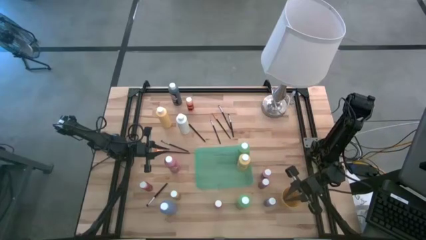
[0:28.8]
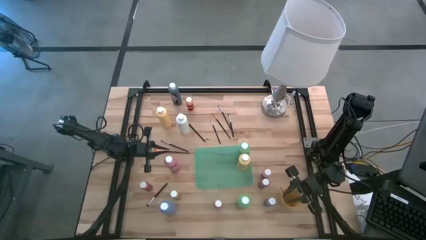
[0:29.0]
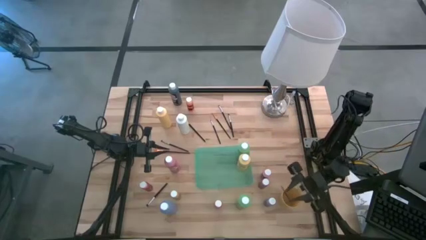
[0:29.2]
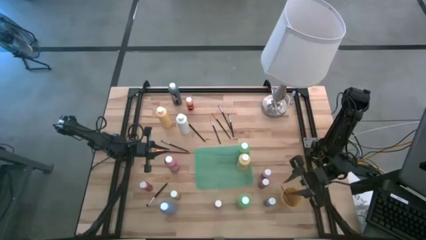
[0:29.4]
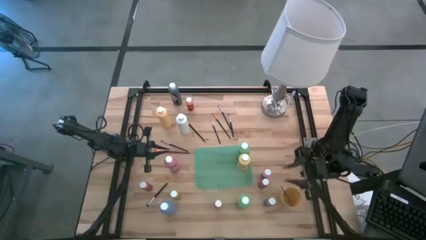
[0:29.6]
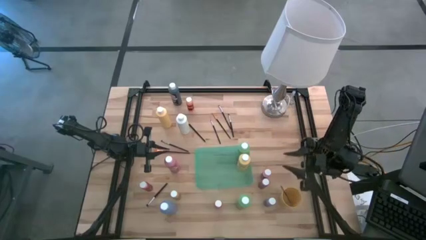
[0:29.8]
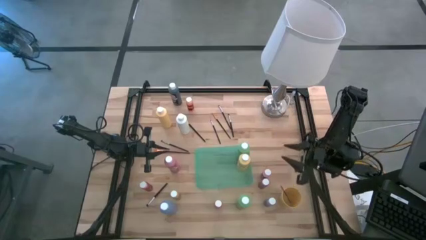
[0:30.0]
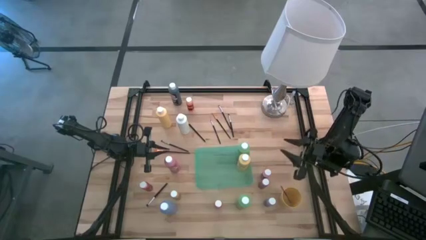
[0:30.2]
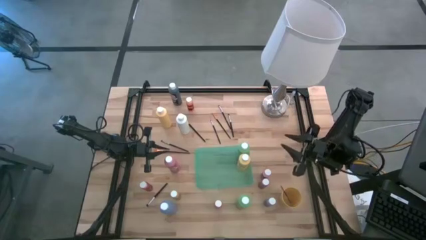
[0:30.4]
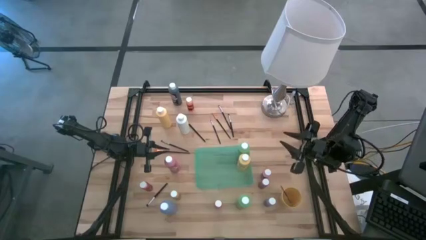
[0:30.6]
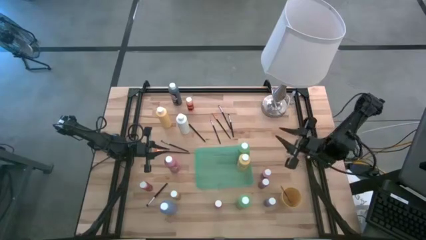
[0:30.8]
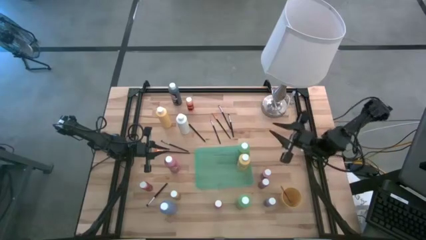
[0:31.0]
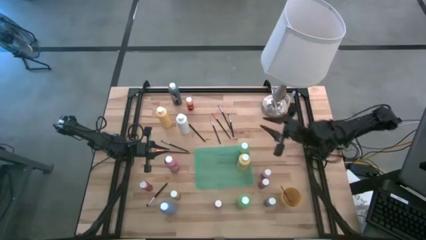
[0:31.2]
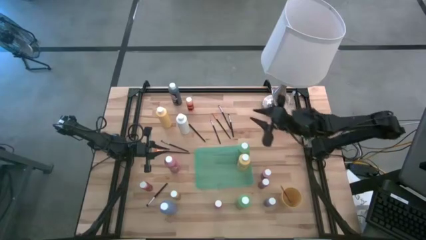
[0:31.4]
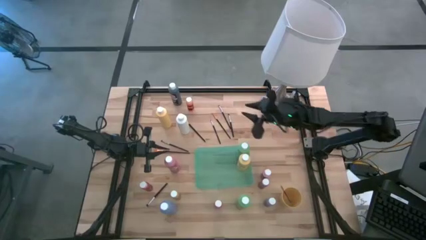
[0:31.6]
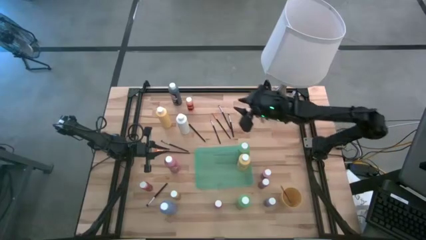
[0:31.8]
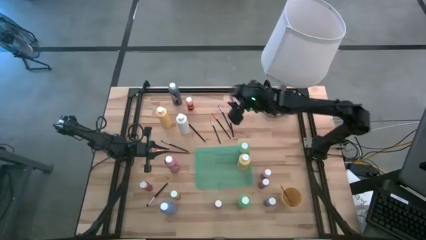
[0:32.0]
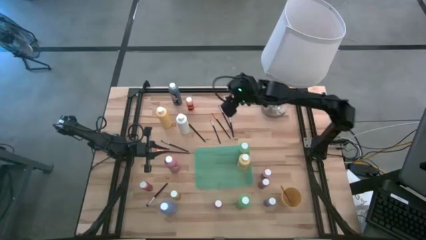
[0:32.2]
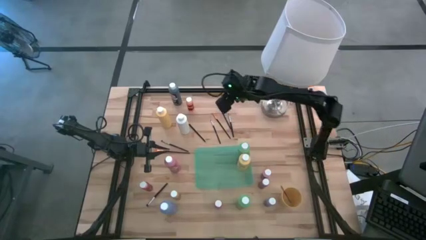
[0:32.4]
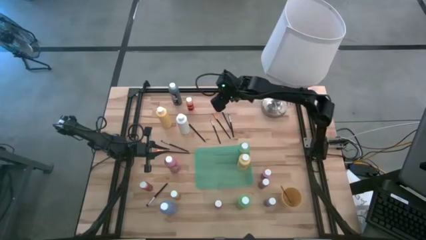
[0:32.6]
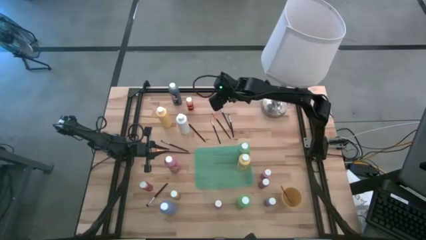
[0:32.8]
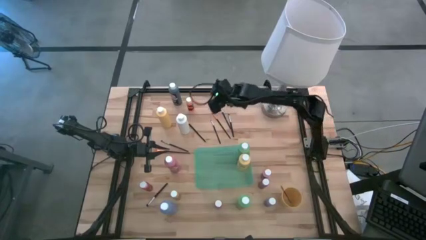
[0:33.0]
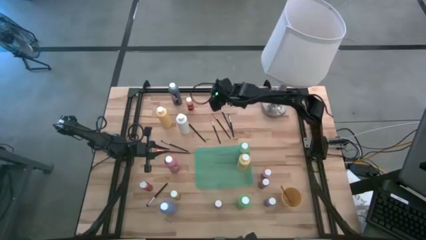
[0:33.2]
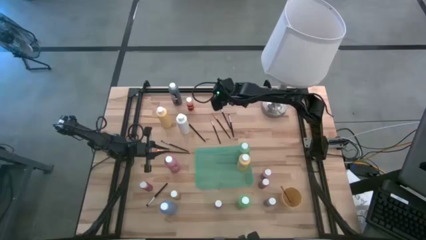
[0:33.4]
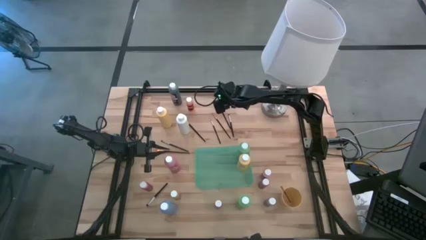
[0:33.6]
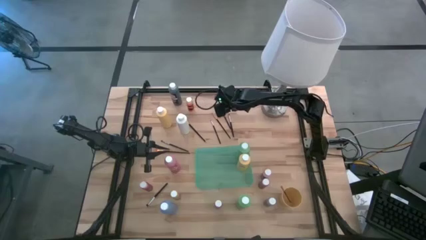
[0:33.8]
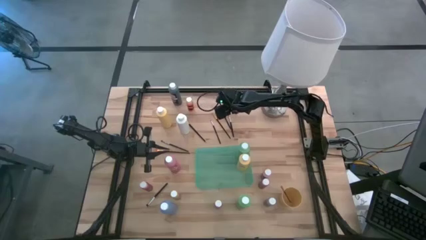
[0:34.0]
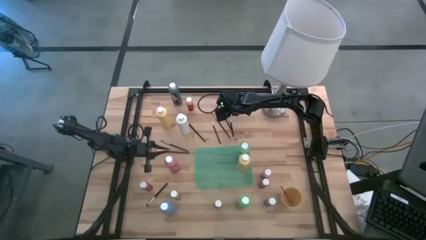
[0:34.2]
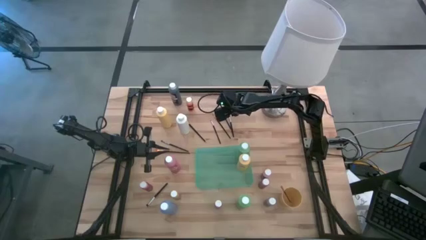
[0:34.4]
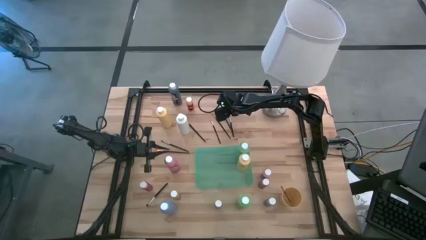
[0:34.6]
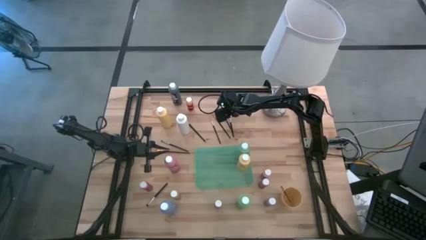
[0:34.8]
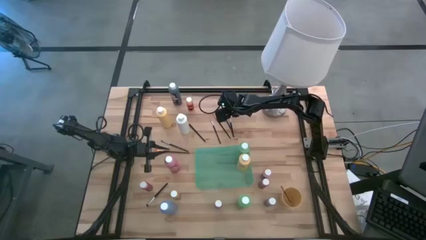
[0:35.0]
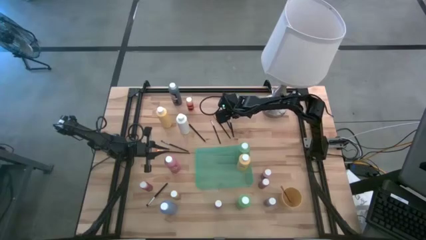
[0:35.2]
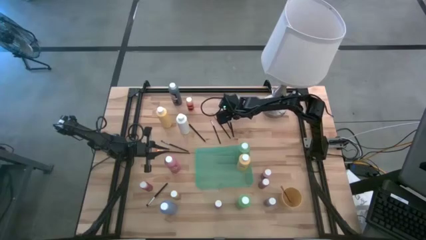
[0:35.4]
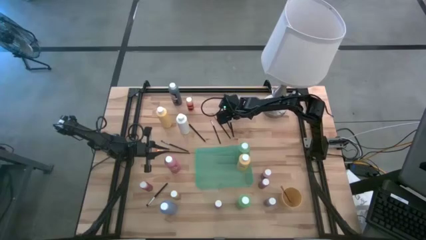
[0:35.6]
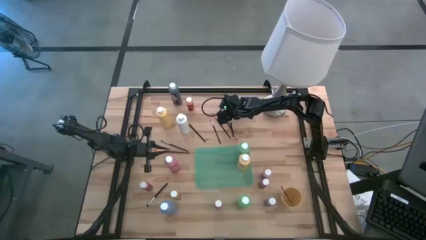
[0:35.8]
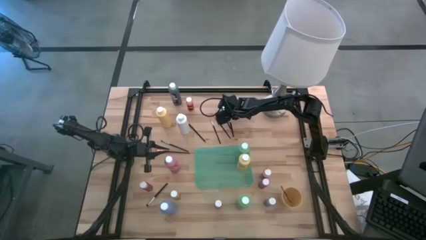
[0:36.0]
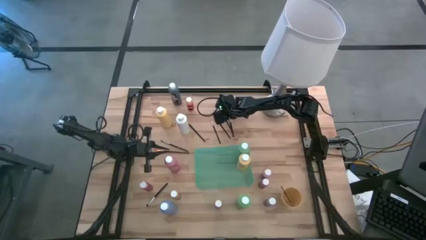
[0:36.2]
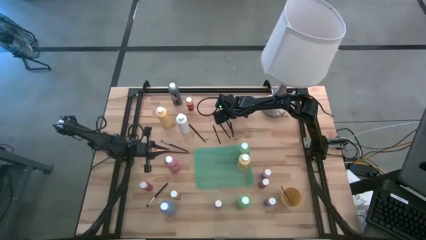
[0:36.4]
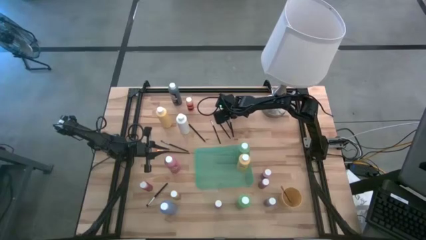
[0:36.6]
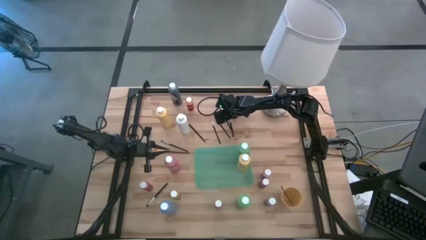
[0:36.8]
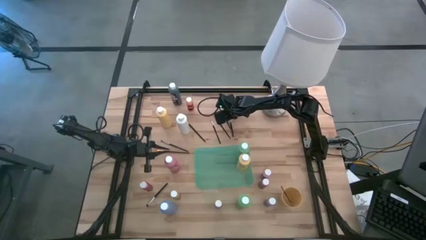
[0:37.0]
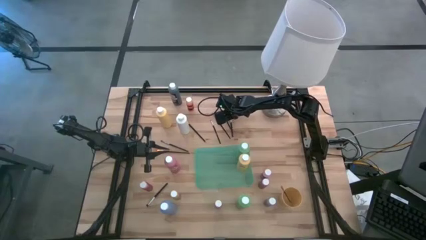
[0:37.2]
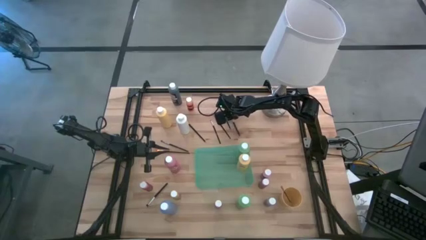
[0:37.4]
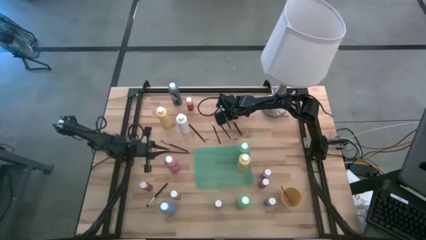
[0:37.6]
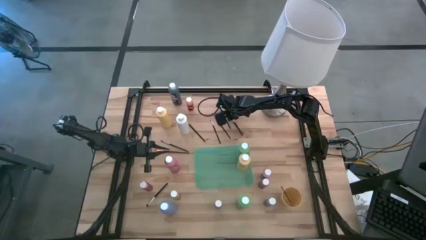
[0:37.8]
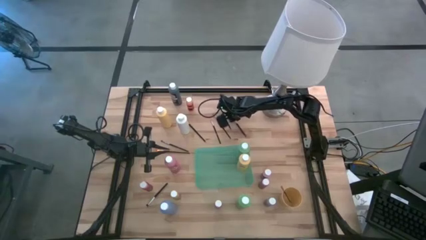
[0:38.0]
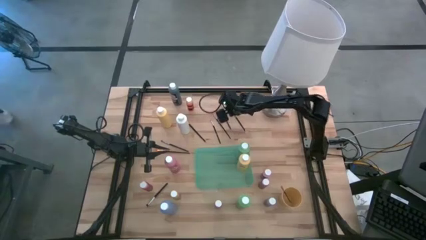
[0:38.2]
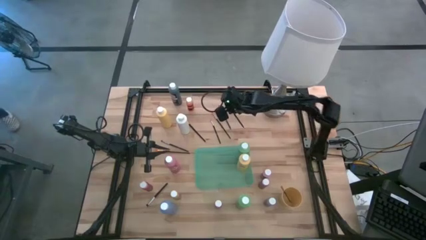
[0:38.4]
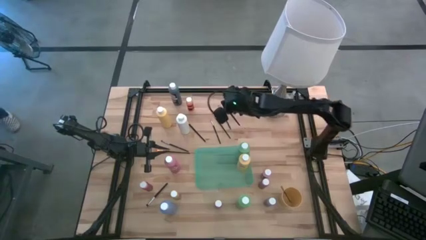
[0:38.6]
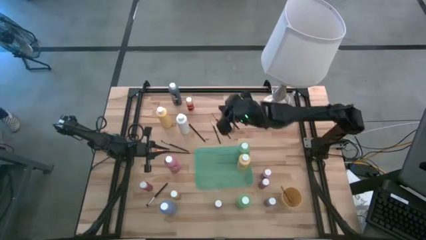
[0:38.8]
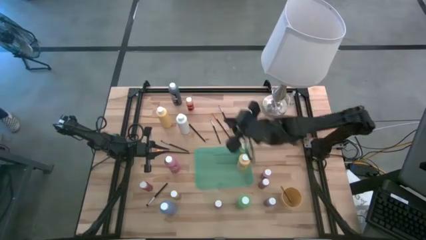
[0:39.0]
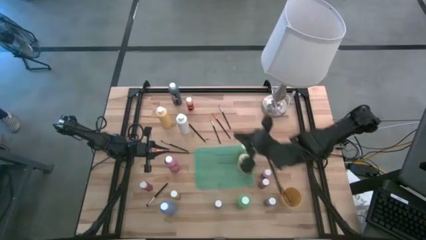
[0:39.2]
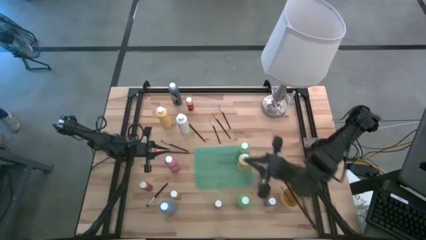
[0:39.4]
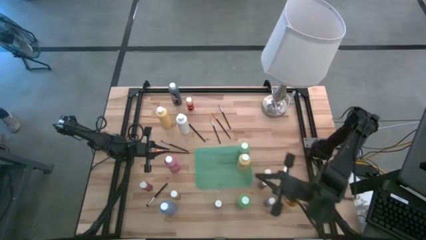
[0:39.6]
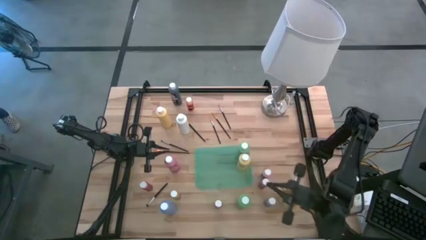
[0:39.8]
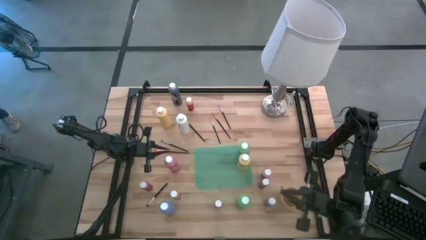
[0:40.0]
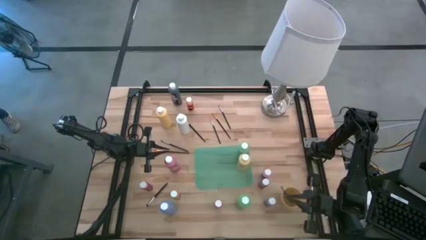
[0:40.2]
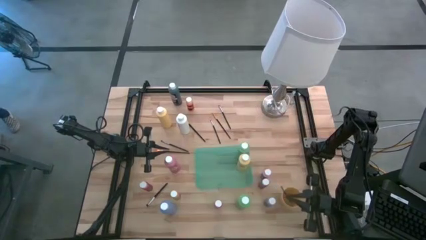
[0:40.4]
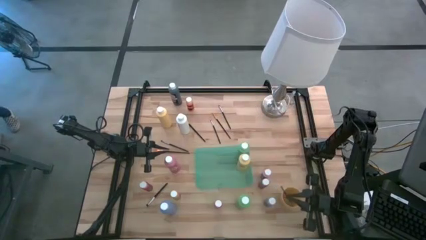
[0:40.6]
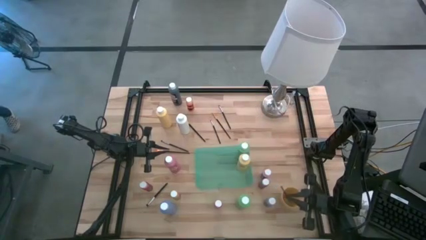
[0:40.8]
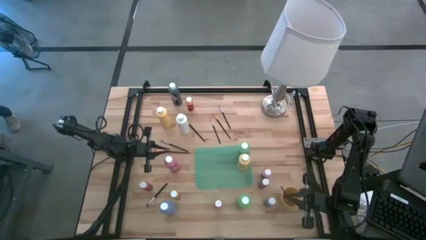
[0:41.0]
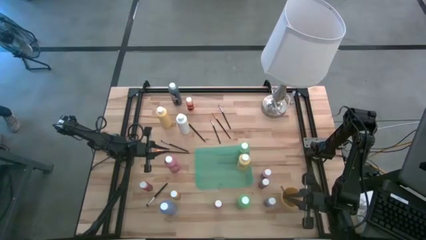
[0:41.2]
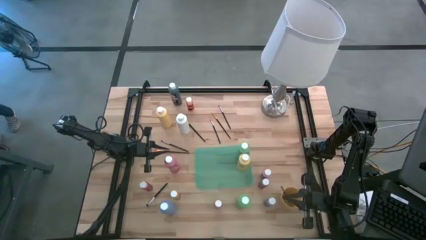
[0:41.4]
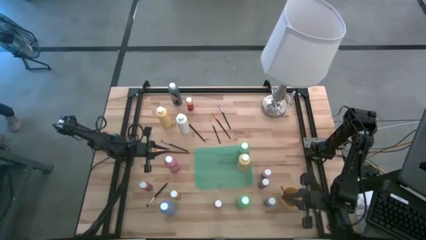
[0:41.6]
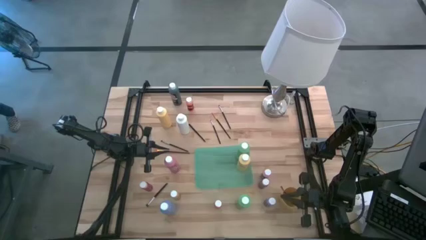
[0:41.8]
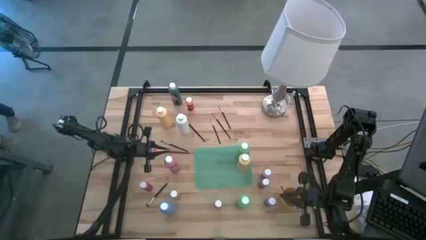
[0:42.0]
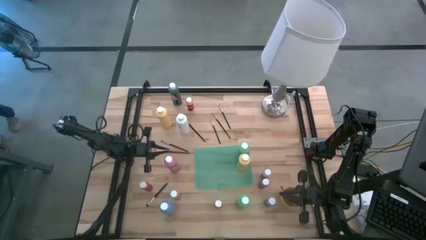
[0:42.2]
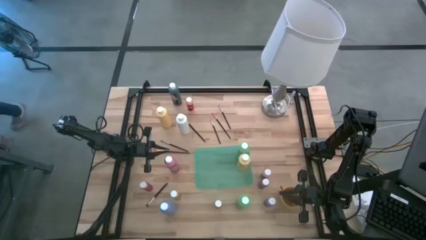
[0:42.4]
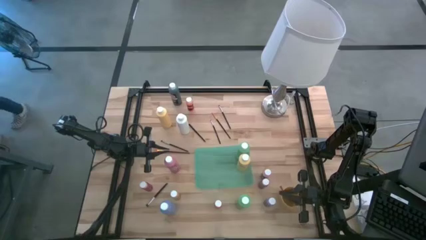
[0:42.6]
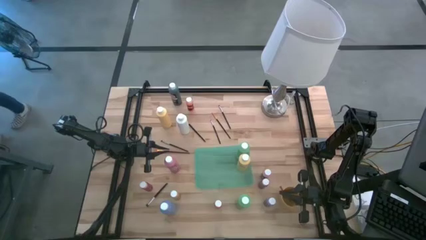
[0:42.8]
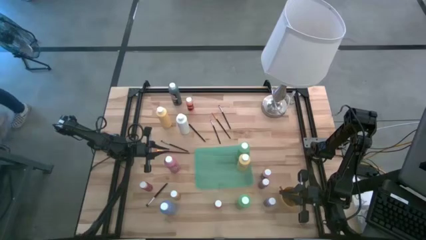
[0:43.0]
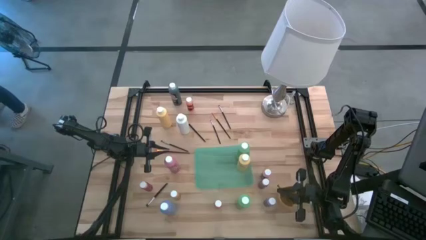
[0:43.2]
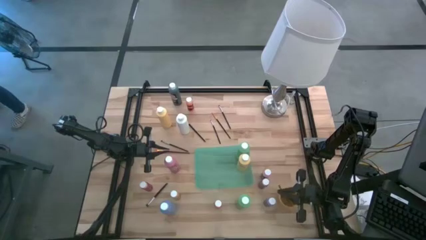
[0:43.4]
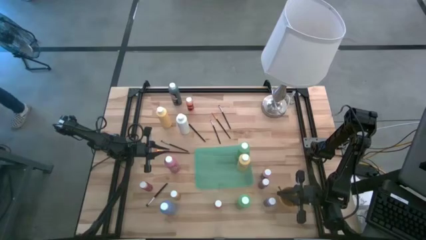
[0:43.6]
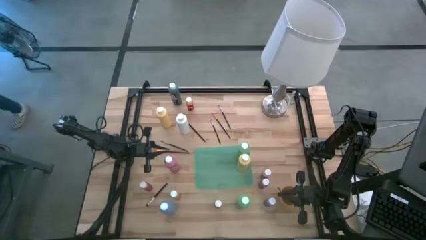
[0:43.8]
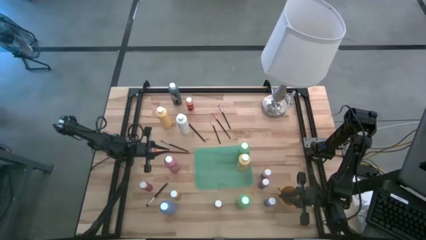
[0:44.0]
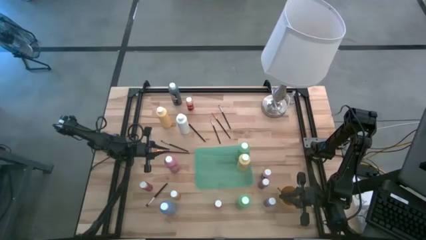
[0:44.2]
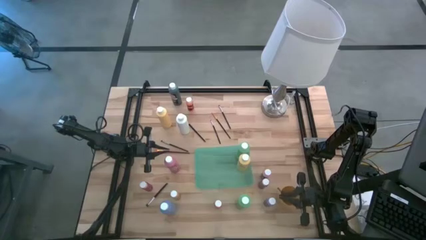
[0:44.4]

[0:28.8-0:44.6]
Task: Pick & Place Paint Supplies
Put the silver paintbrush into the yellow cup
